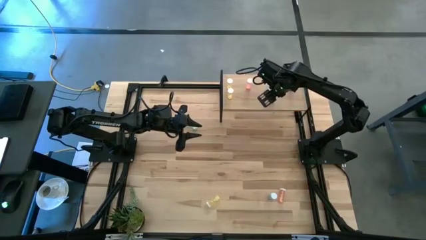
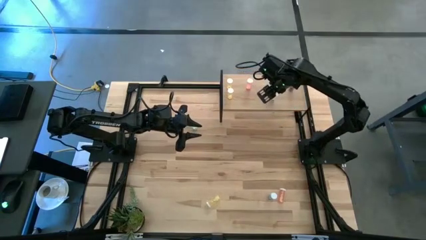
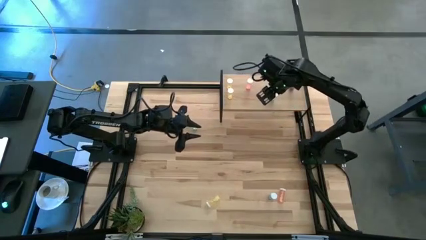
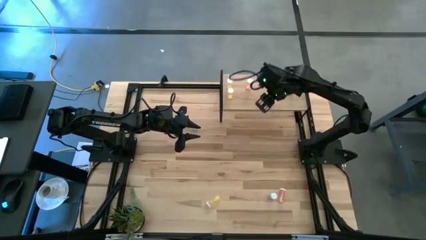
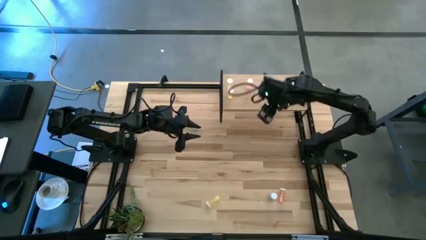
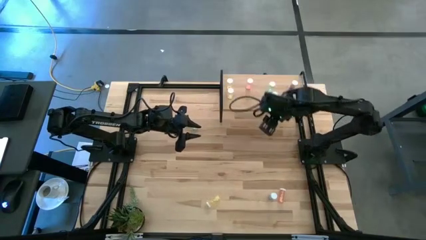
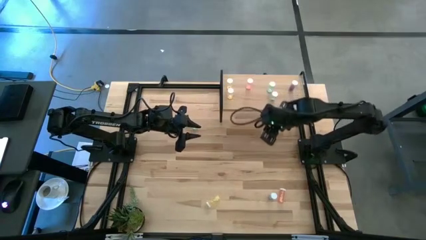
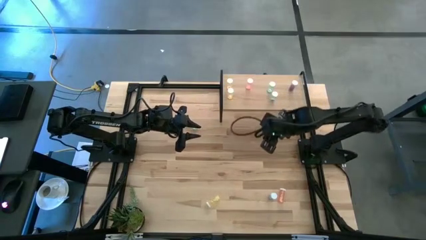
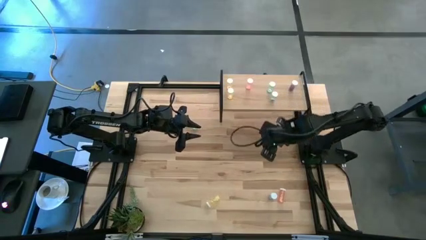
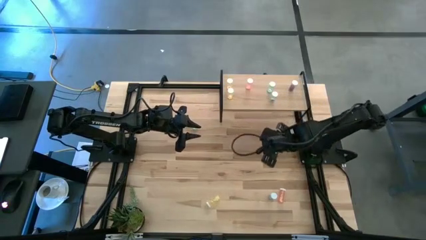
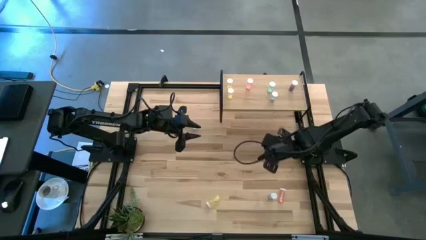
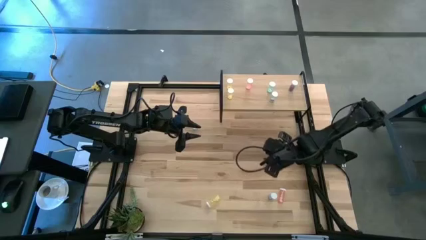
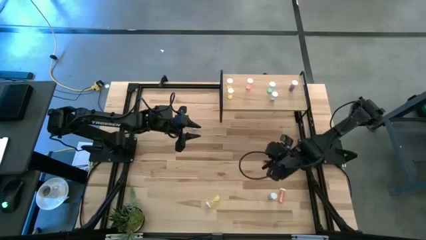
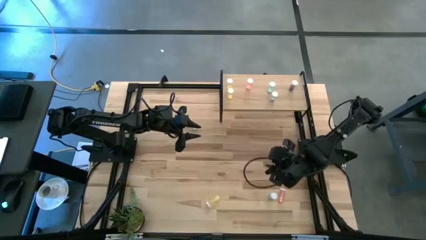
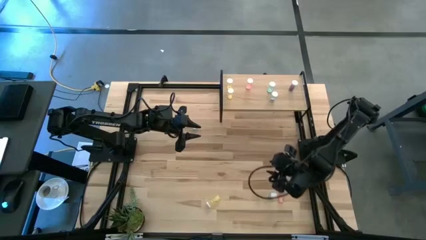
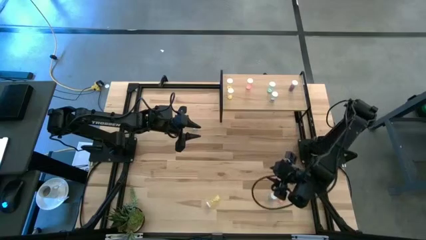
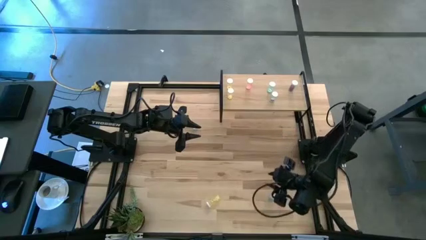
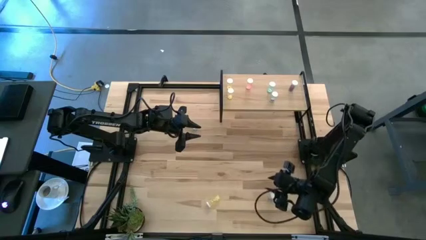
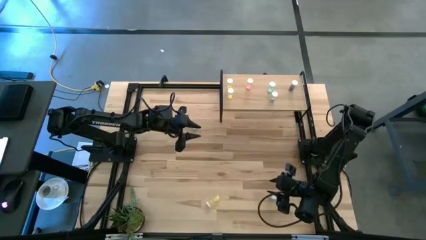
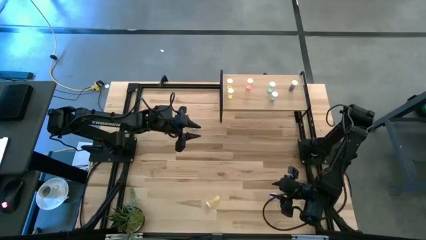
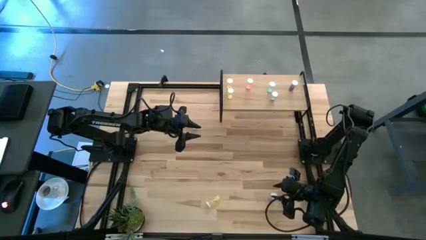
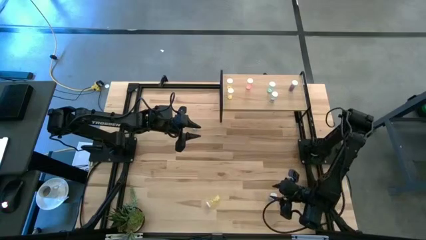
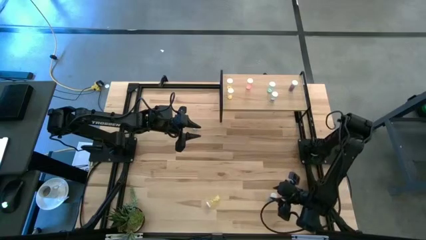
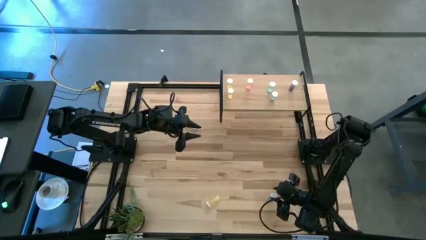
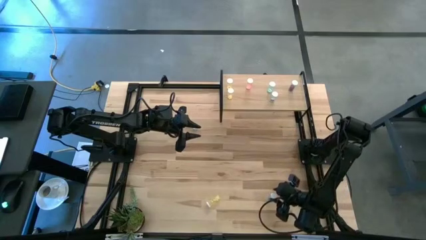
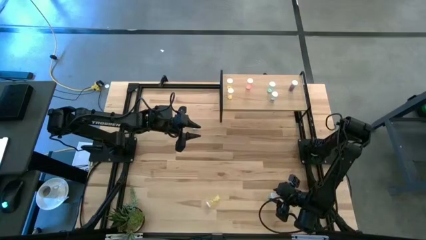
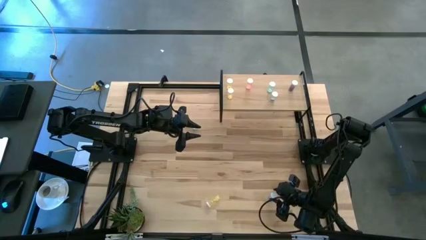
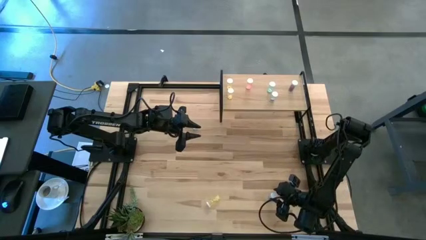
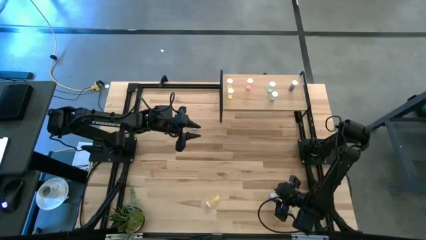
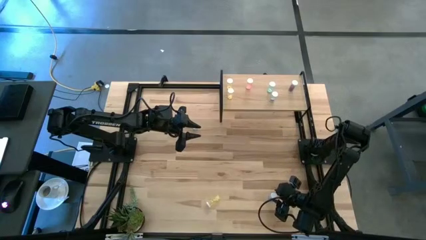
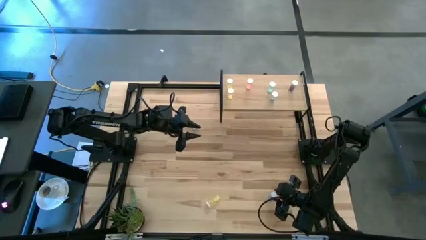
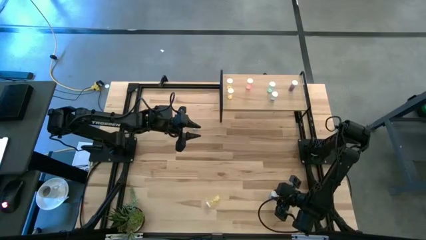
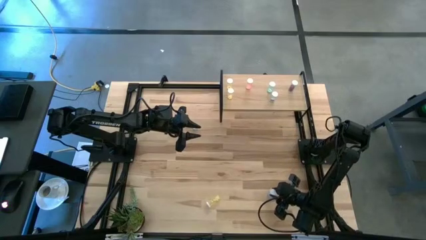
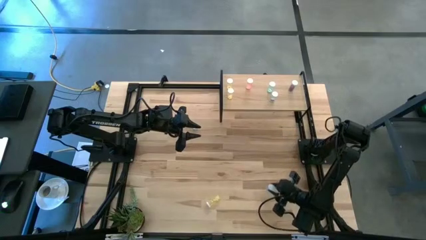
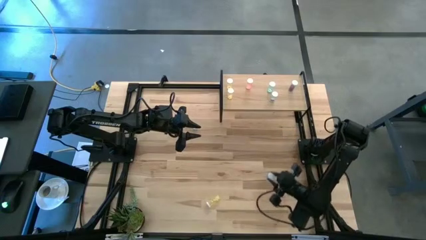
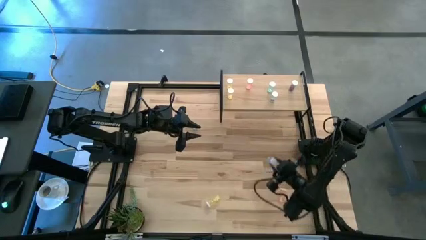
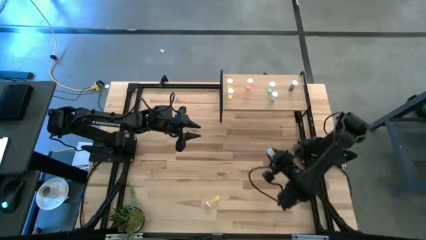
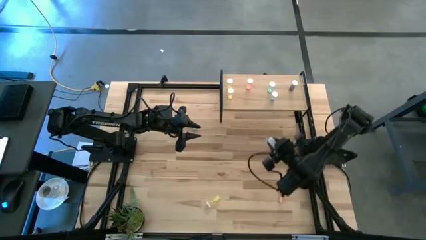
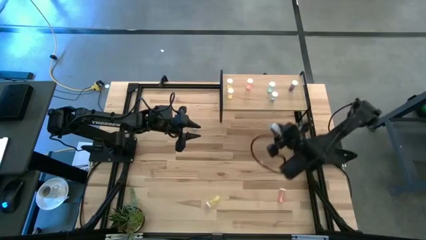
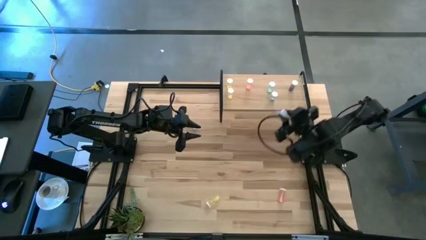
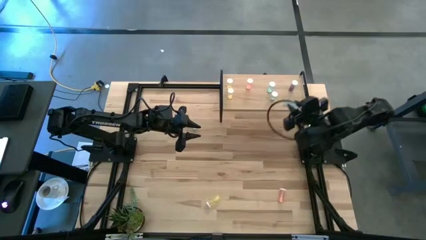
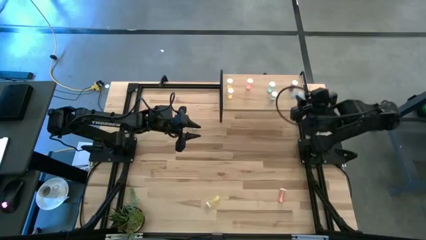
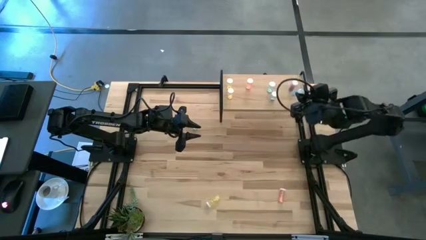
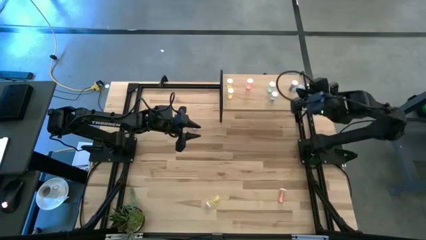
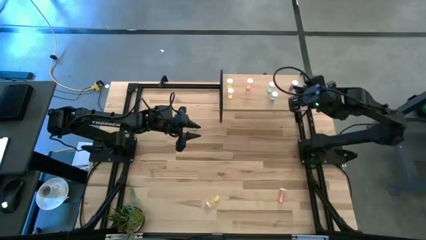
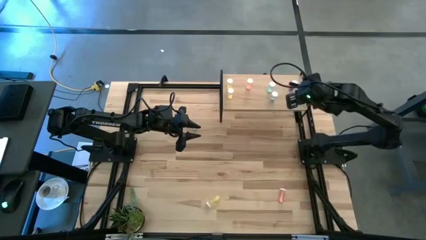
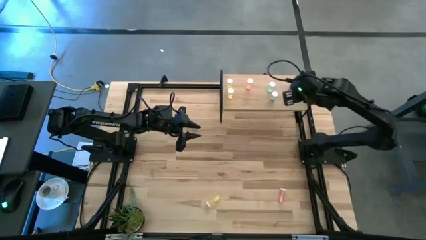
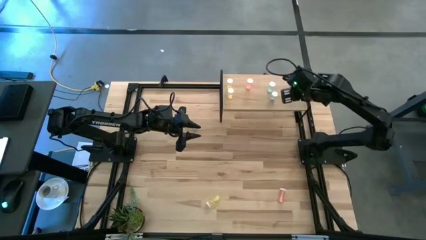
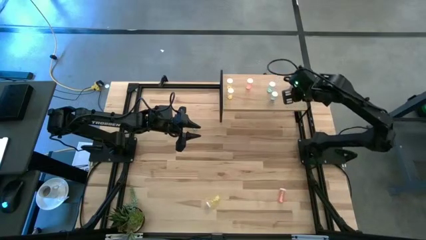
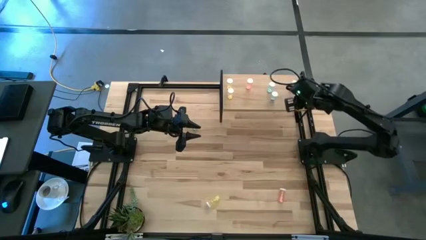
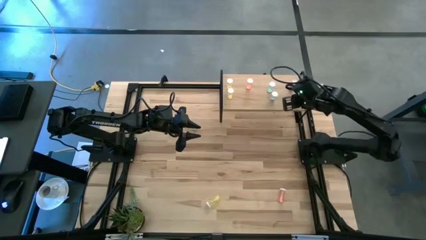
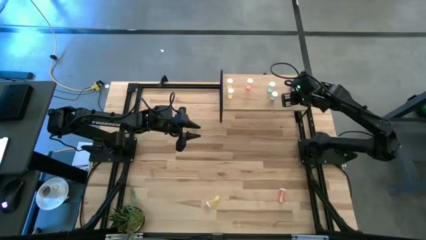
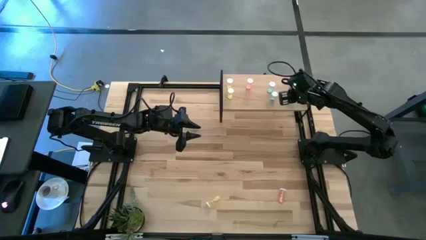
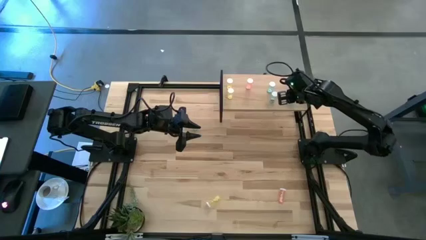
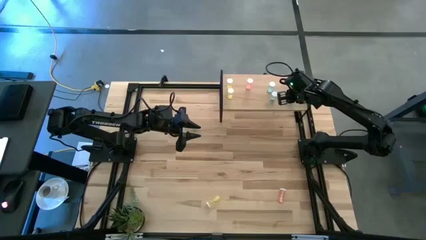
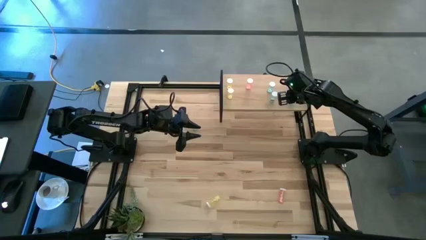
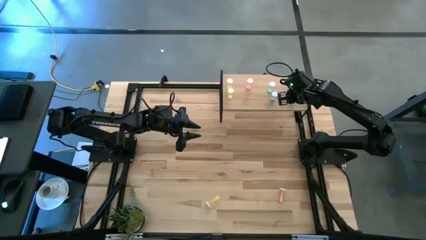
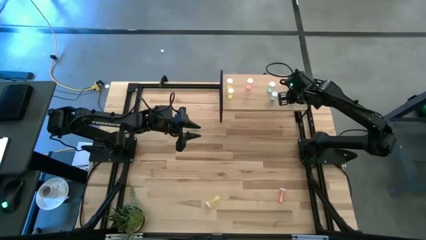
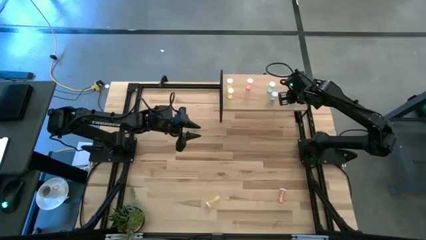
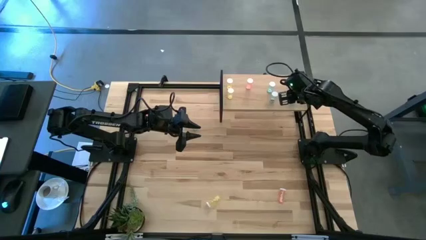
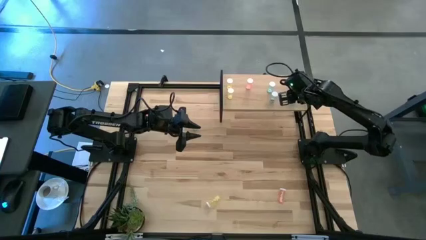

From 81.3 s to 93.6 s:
Task: Pick and place medicine bottles onto shelf by color
Put the right blue pill bottle on the shelf aligned with the other blue pill bottle

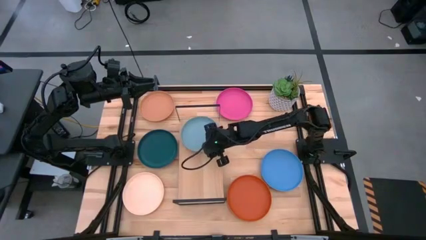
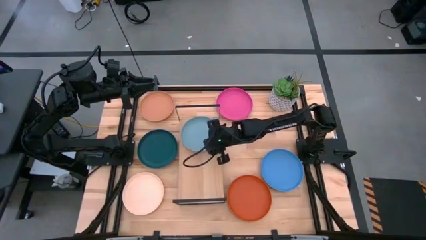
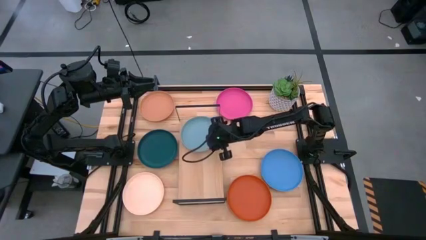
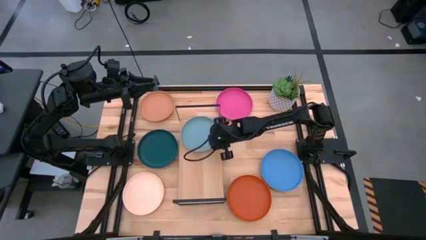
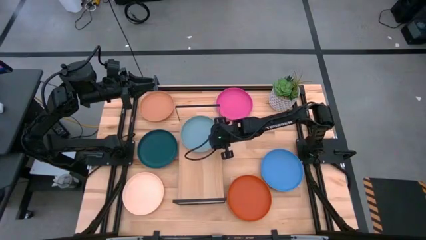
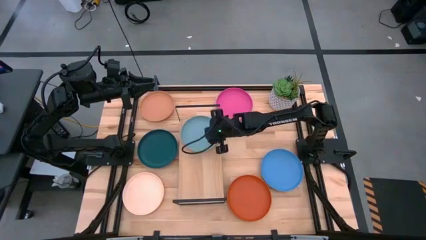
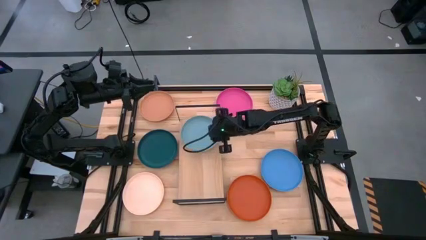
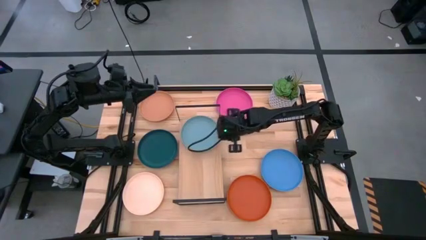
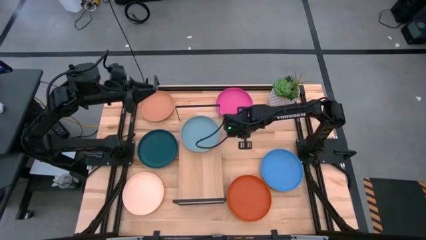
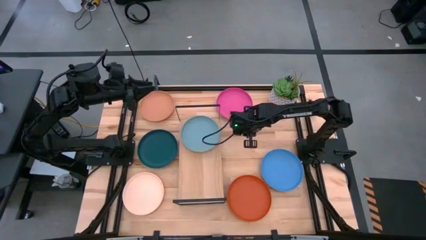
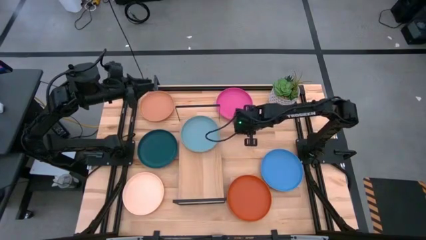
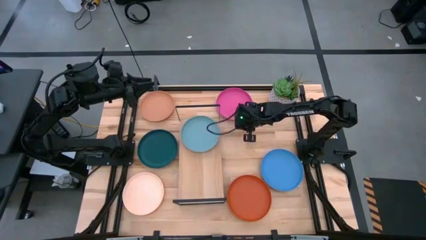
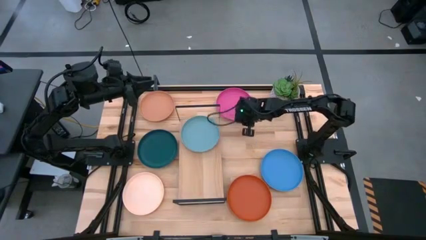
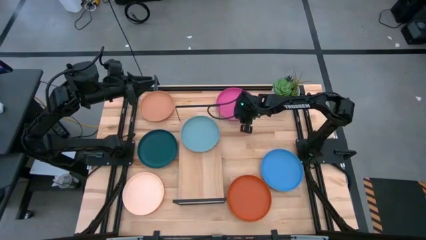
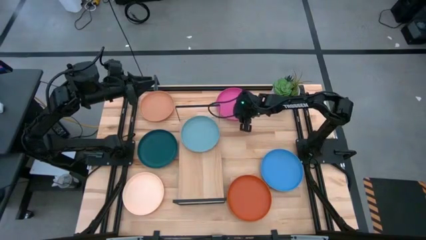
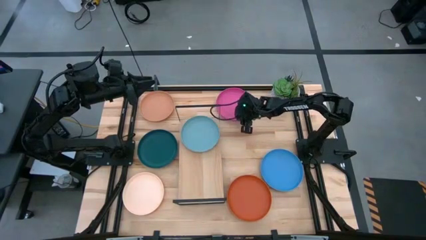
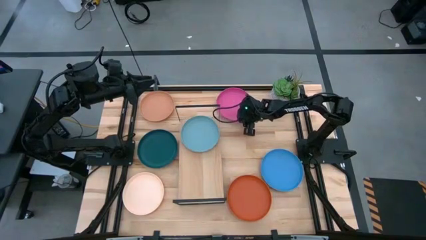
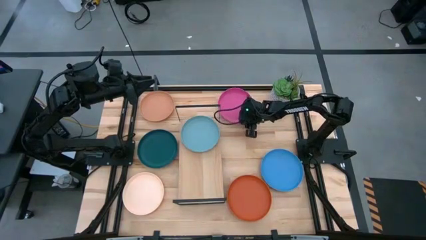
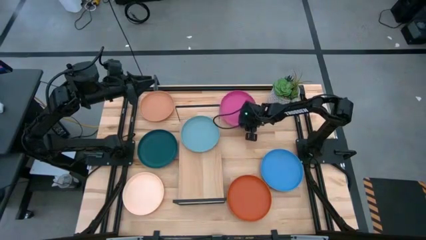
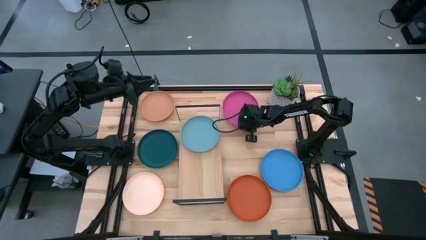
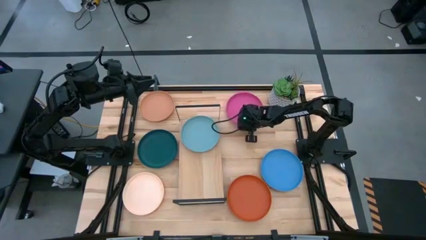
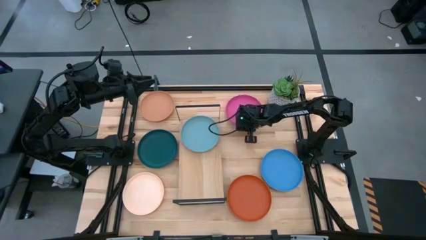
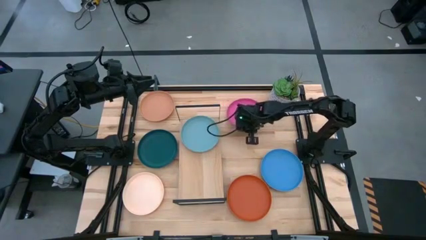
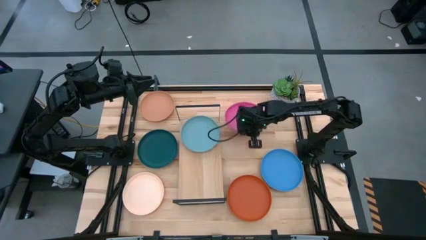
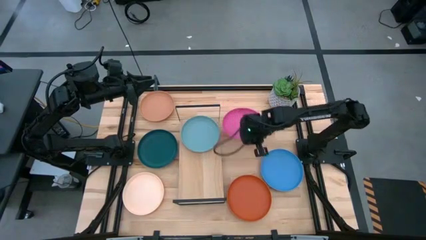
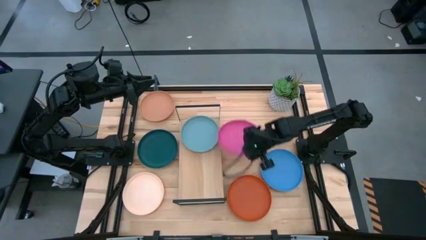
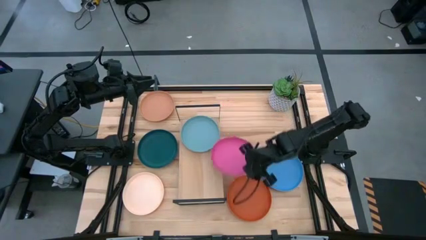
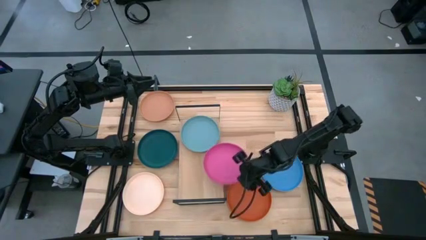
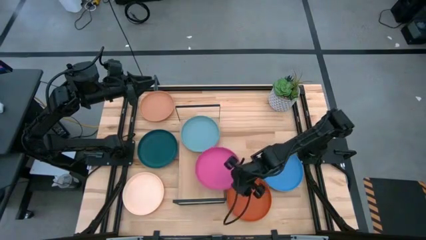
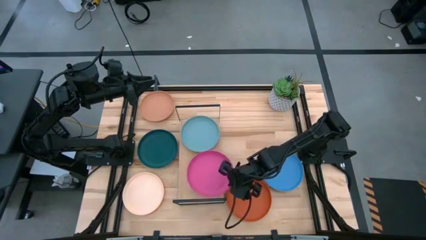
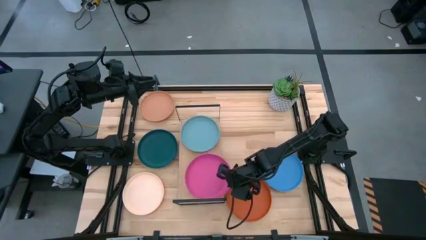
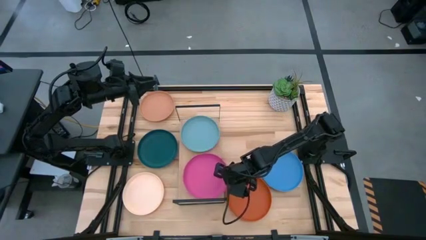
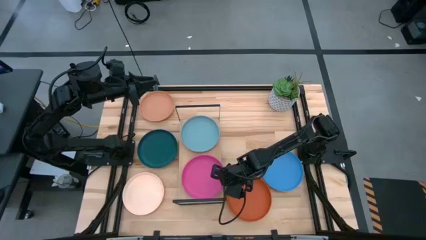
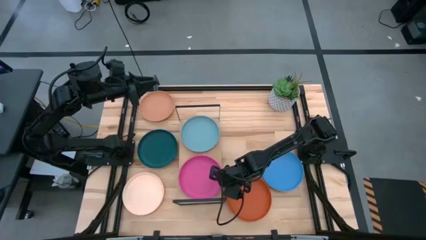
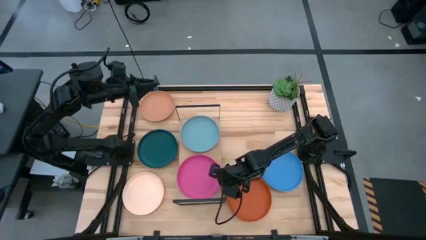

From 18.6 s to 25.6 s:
Task: Place and stack plates onto a shelf
Put the pink plate on the shelf
